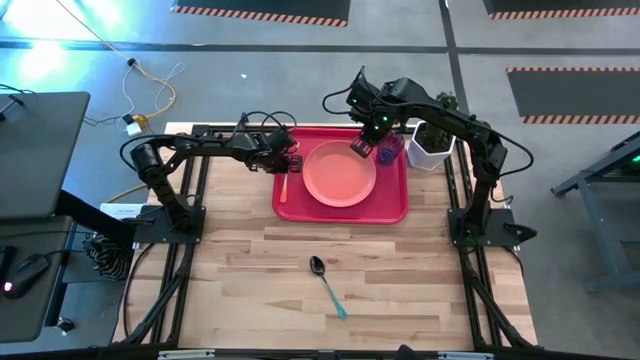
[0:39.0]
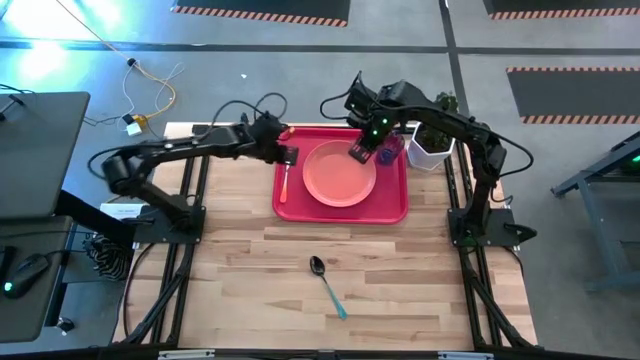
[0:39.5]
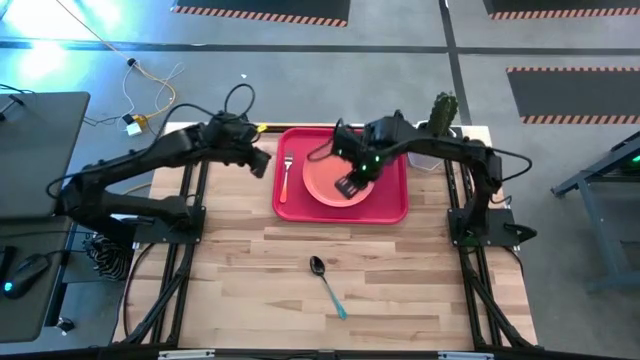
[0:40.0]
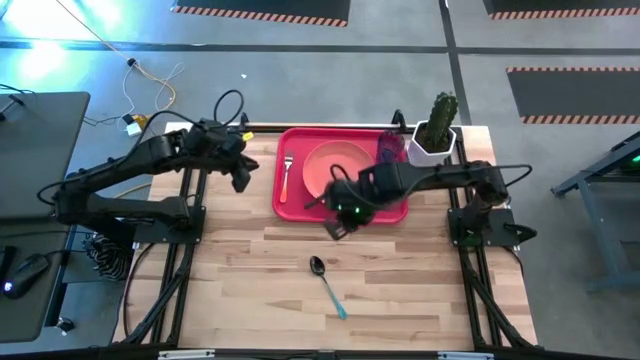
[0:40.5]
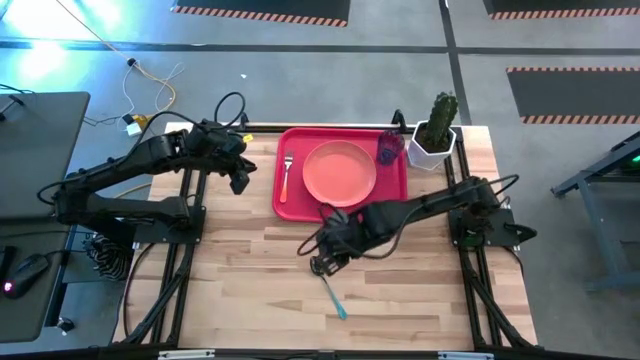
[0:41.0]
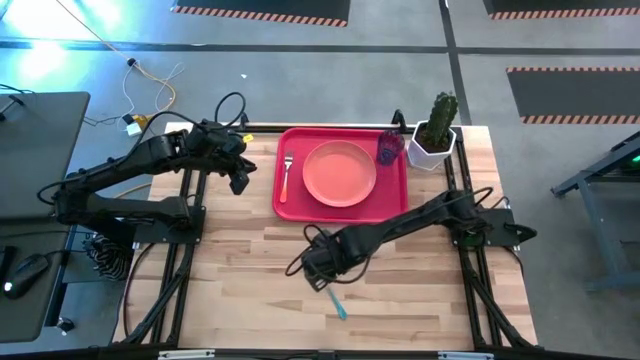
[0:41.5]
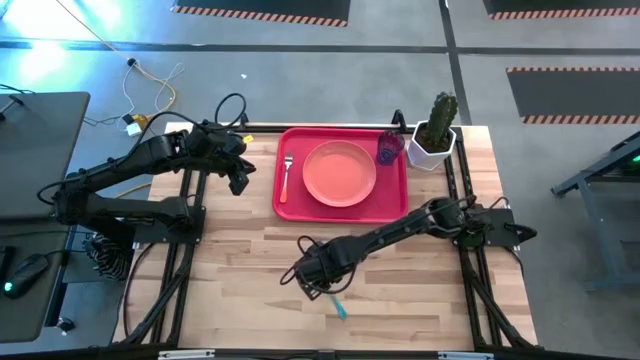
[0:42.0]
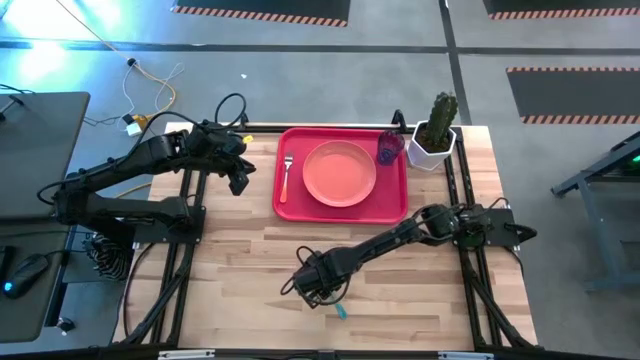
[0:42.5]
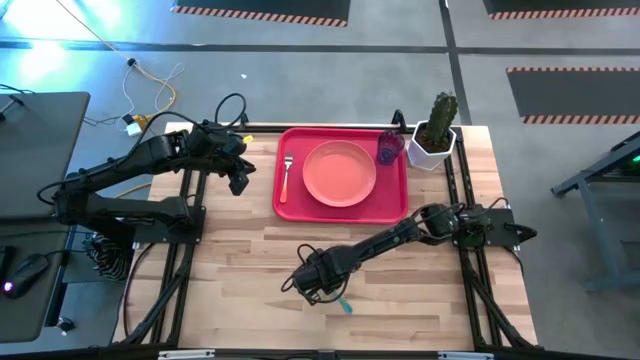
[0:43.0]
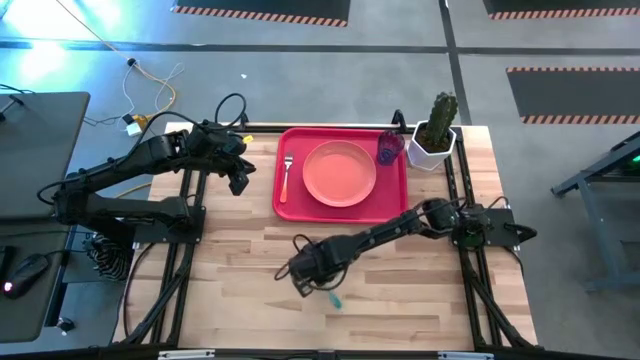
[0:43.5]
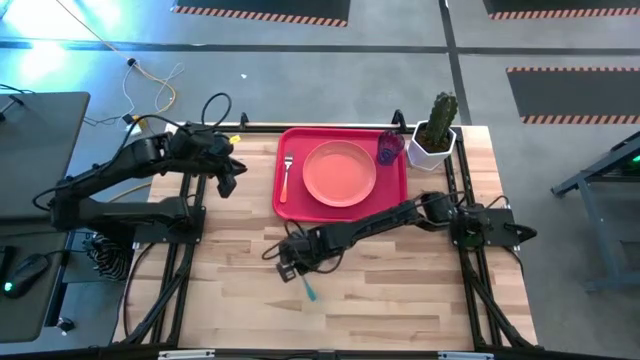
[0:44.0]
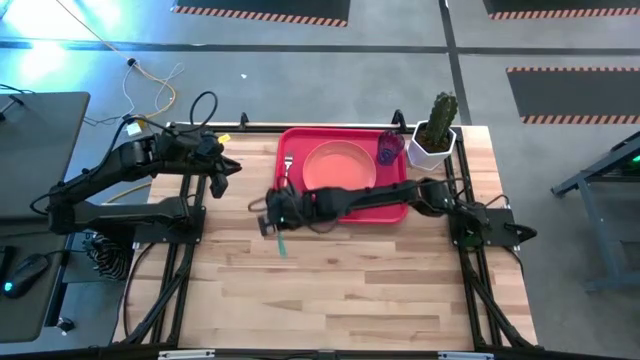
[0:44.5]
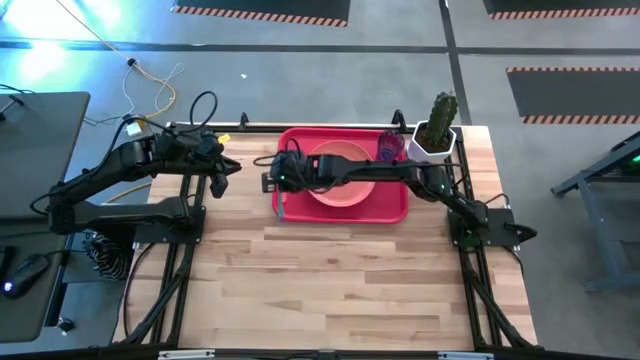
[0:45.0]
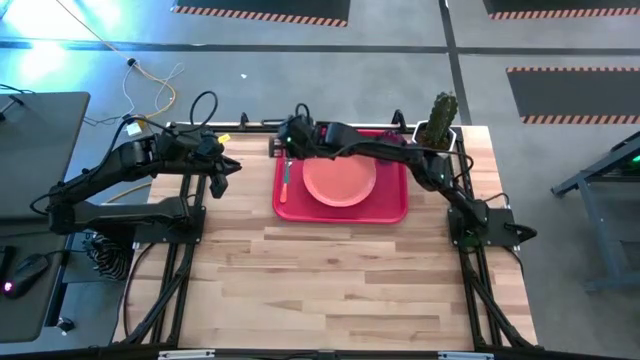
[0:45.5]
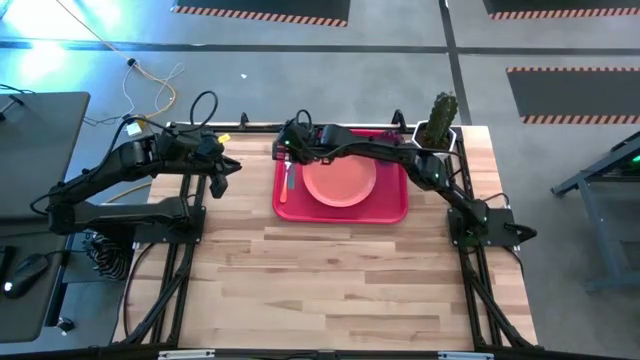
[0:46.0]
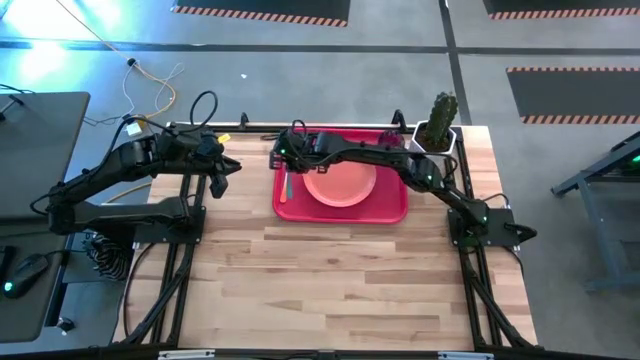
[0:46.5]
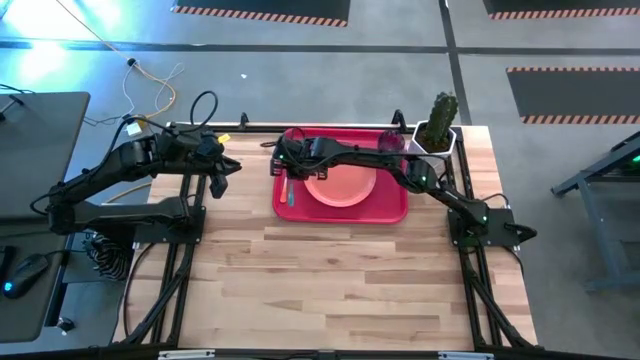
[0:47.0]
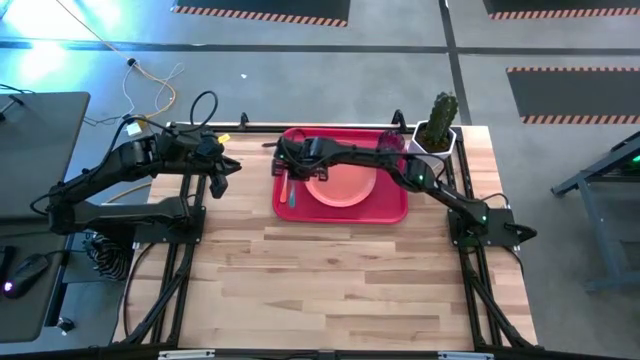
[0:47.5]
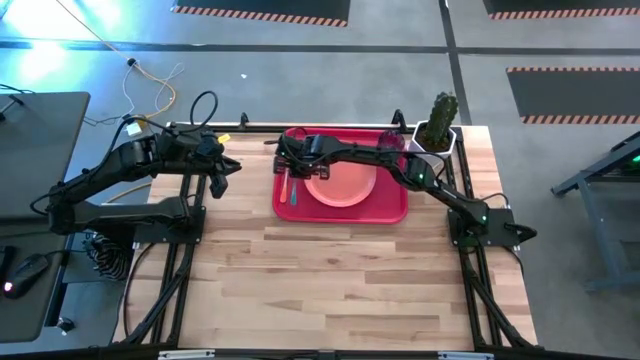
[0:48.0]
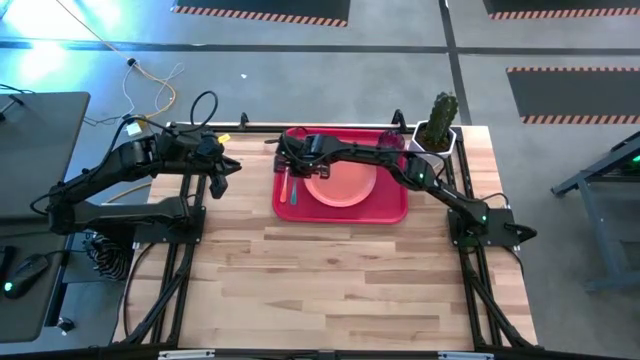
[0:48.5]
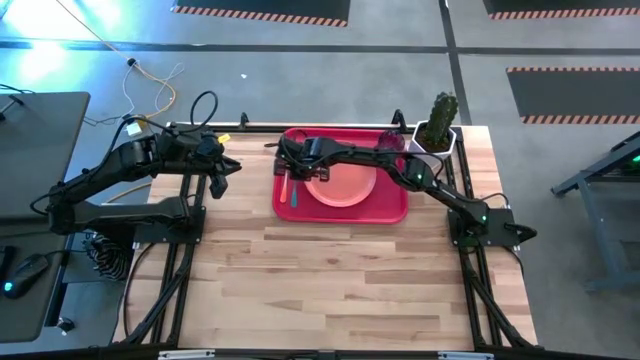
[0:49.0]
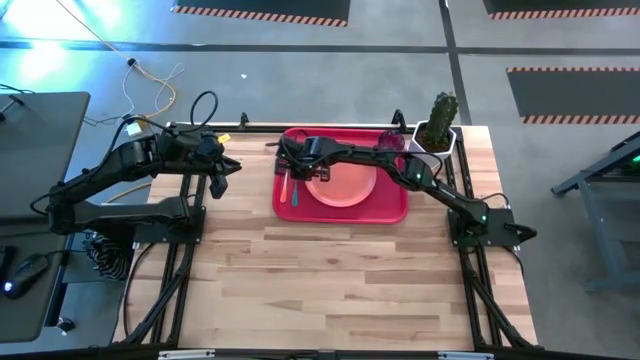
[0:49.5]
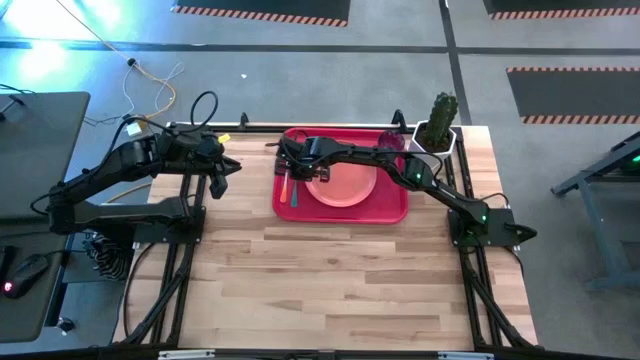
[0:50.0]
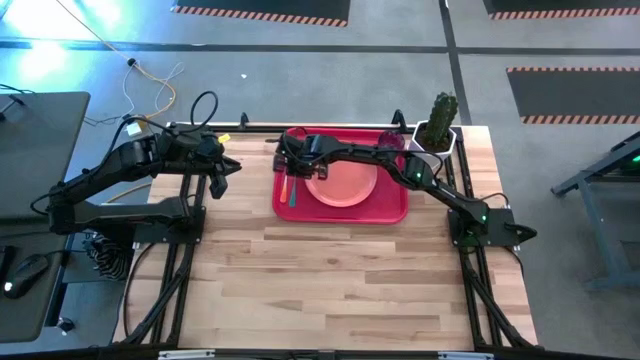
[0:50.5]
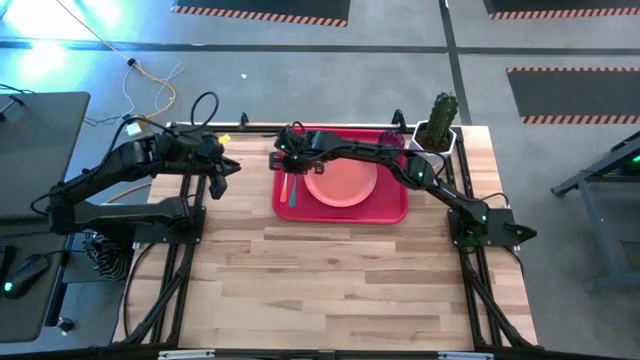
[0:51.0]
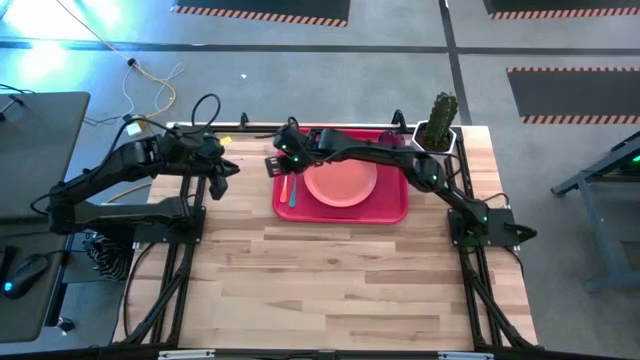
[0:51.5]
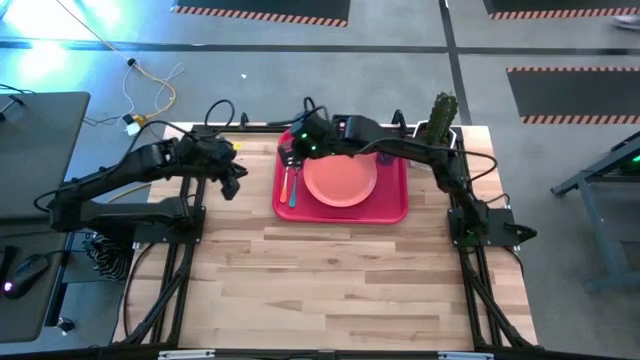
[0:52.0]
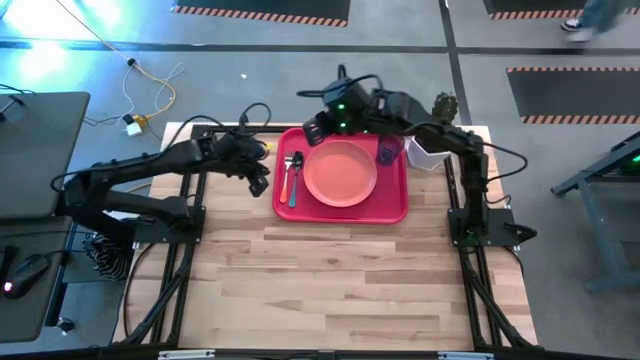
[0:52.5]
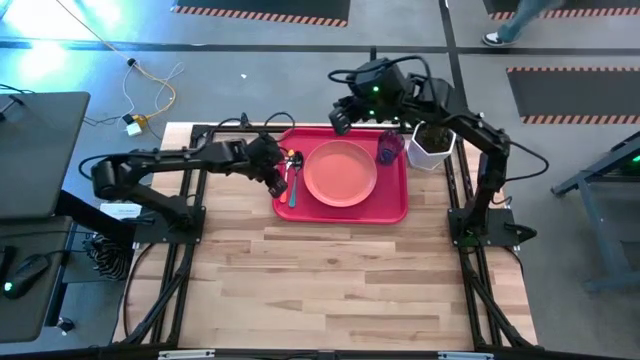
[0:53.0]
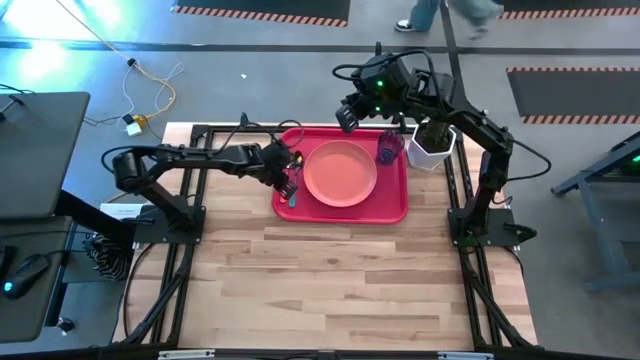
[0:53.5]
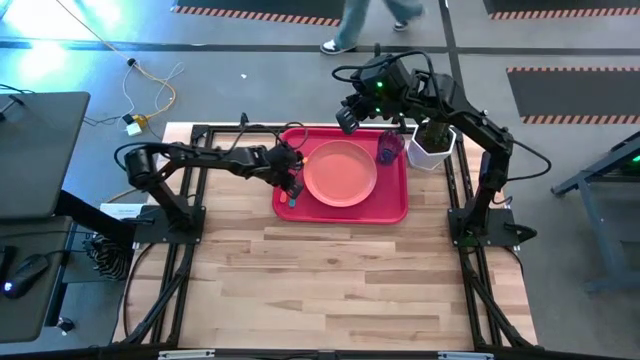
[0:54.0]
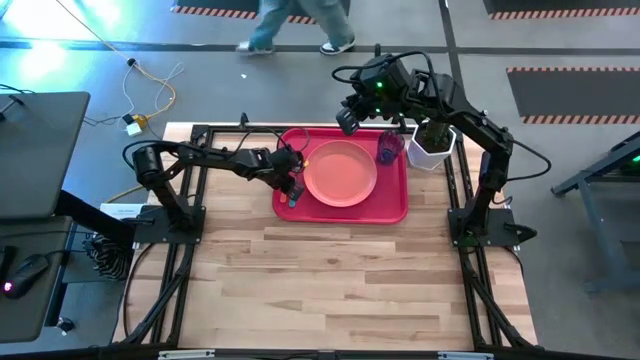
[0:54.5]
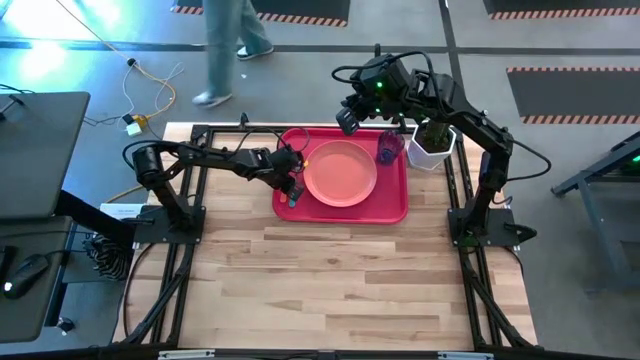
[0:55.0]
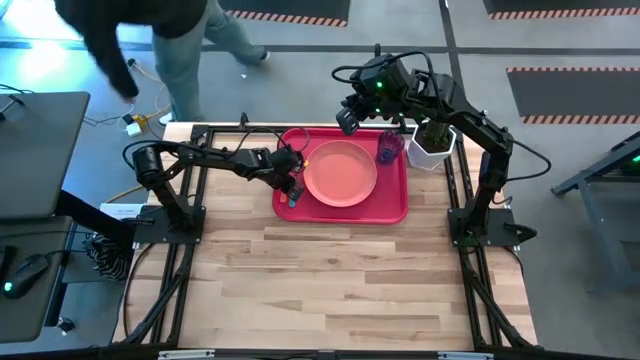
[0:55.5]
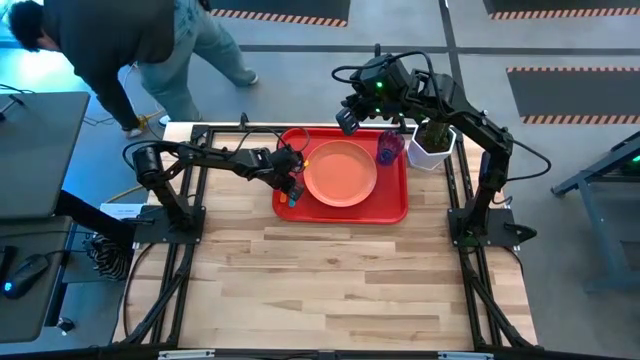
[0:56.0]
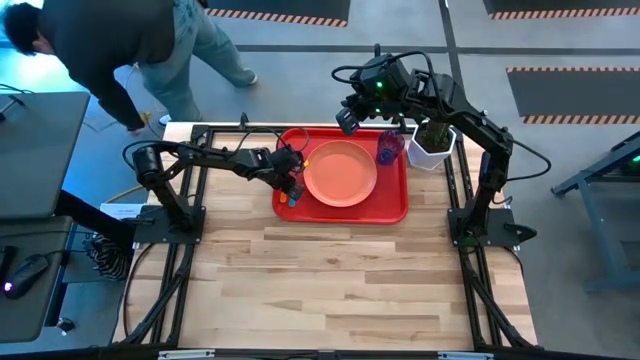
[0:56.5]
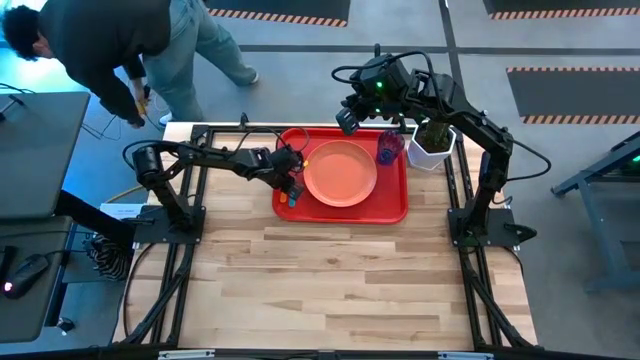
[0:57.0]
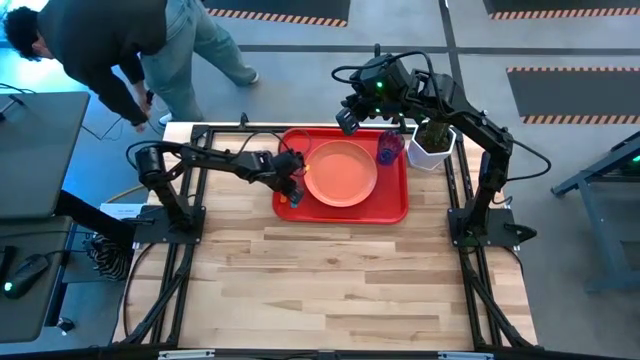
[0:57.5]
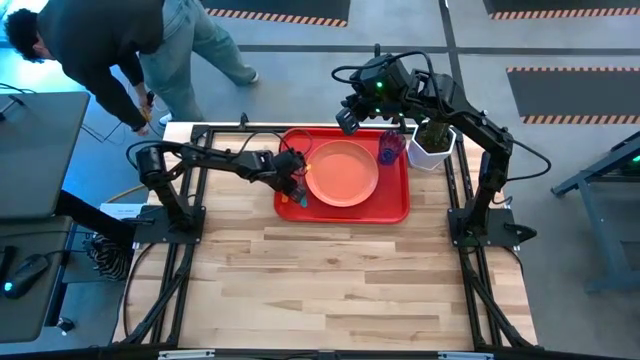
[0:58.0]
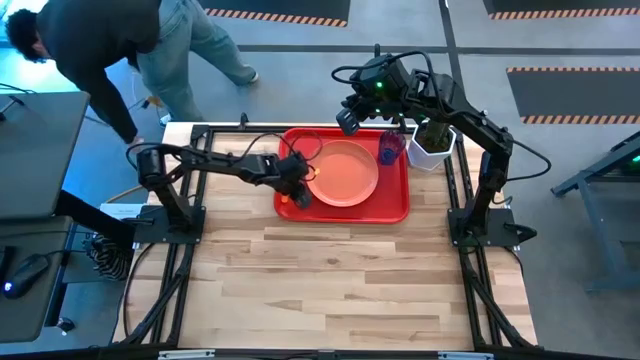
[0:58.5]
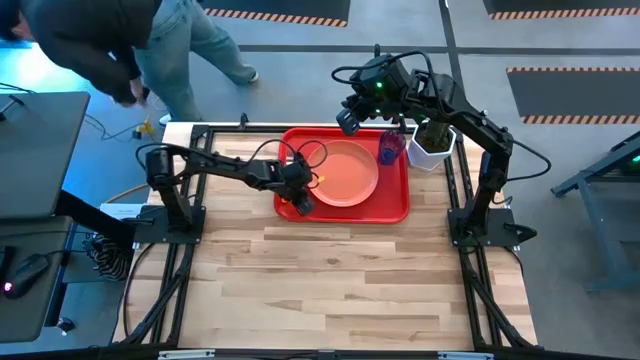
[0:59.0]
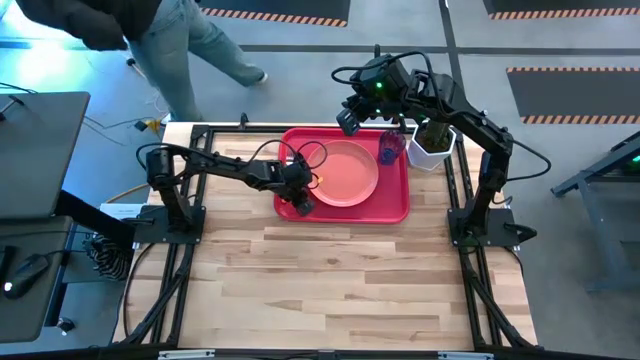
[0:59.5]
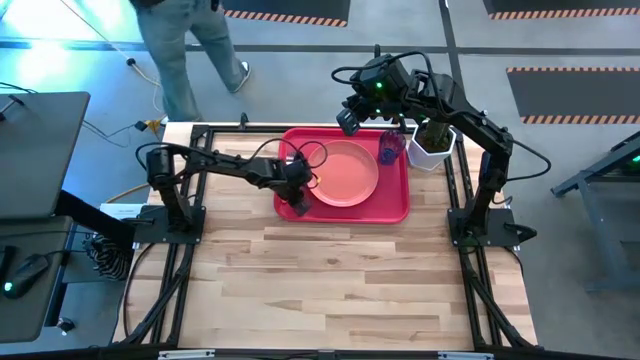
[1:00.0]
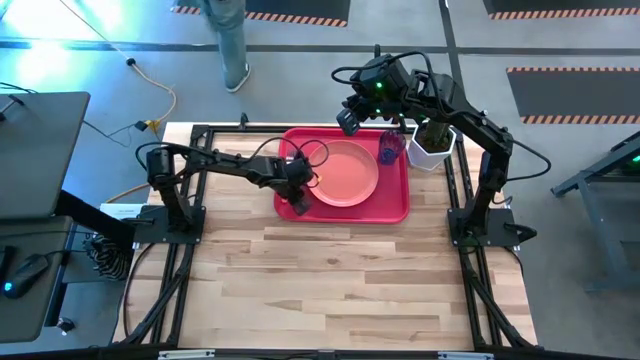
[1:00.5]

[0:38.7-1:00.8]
Task: Pick and place plate/cup/fork/spoon on tray
Put the blue spoon on the orange tray on the right side of the orange fork
